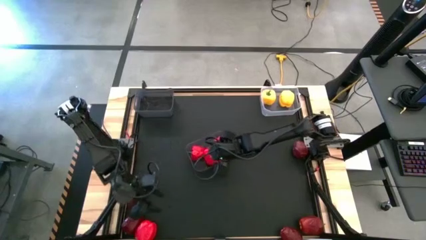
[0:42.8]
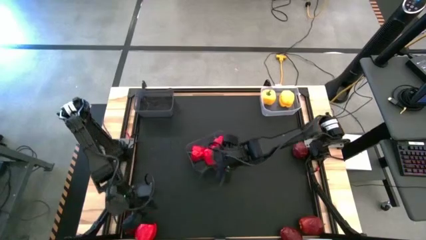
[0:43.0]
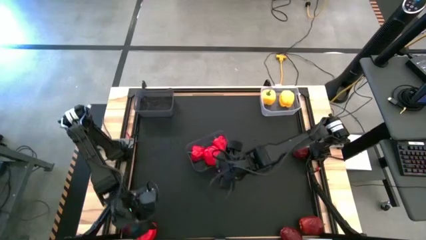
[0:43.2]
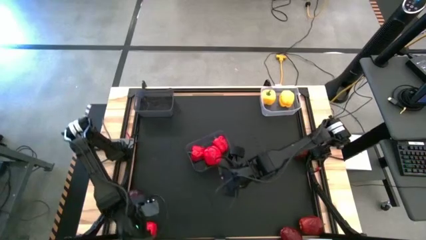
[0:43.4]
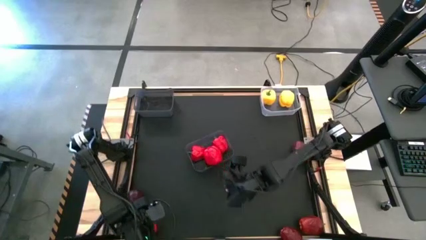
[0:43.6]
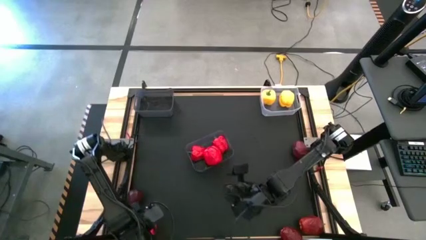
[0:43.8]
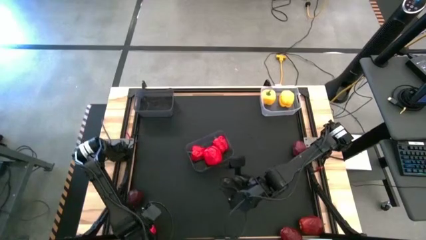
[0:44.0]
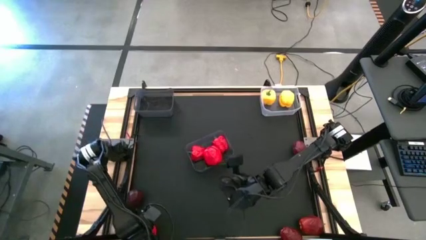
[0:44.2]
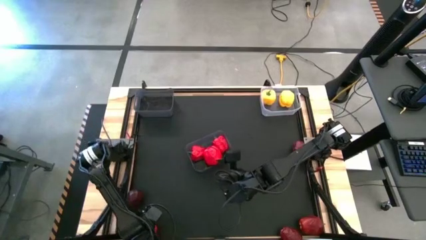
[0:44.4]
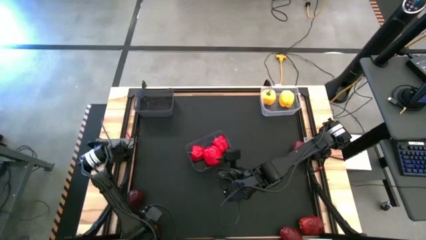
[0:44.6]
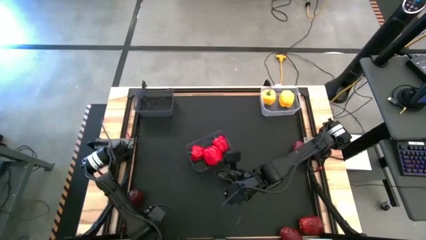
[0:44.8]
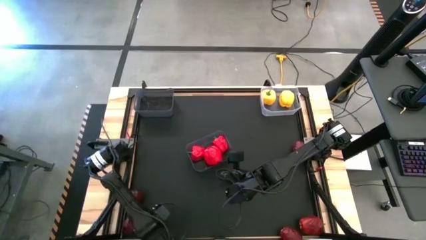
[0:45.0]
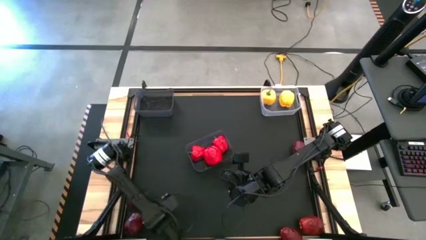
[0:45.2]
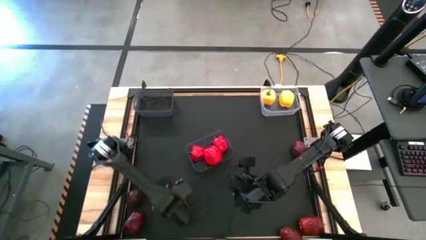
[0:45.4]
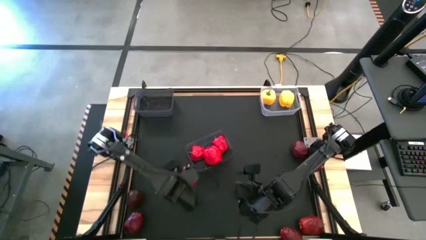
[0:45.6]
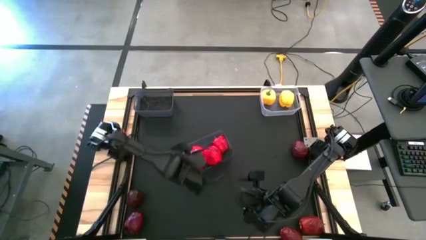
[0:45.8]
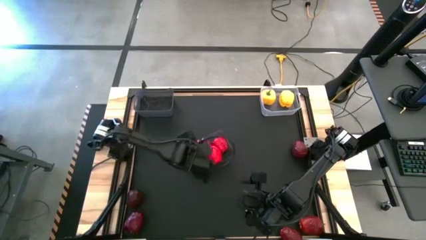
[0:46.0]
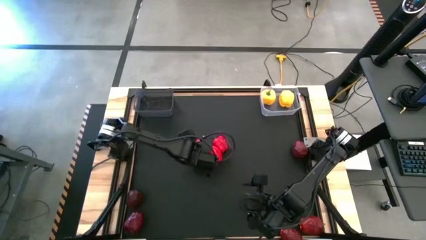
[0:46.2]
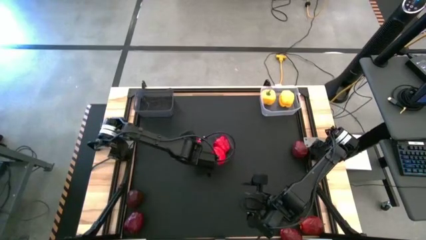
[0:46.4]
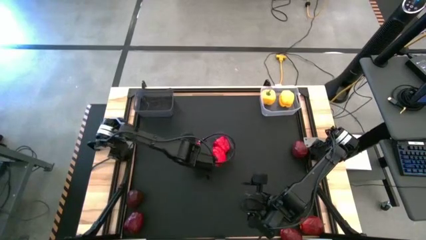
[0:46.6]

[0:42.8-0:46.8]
Task: Sort produce into baskets
Put the red bell pepper into the bottom black bin

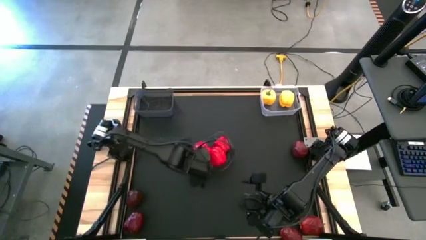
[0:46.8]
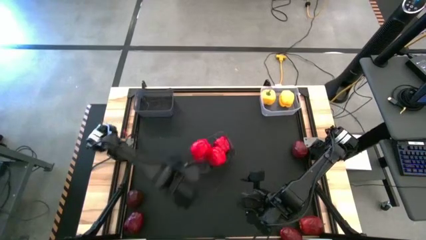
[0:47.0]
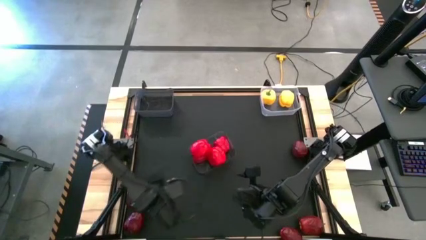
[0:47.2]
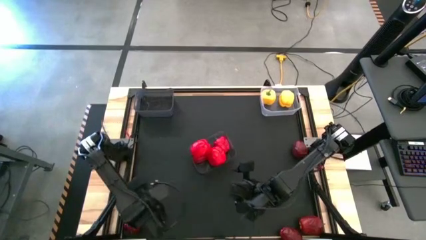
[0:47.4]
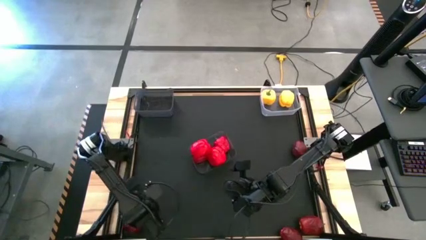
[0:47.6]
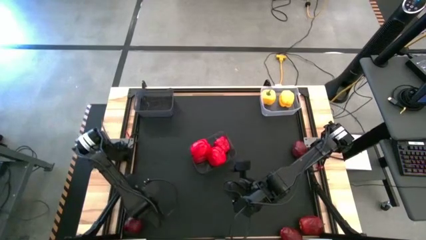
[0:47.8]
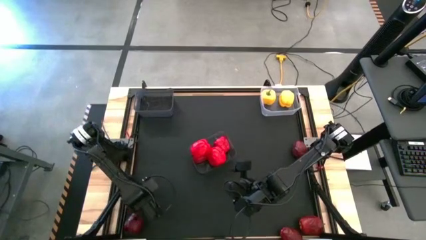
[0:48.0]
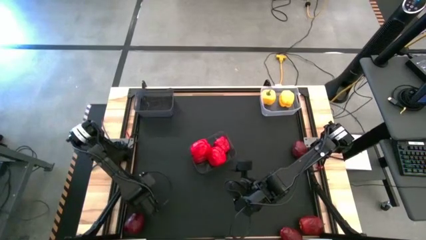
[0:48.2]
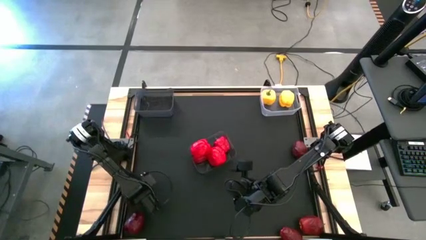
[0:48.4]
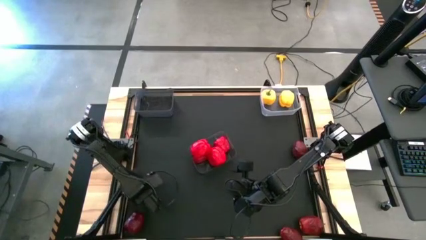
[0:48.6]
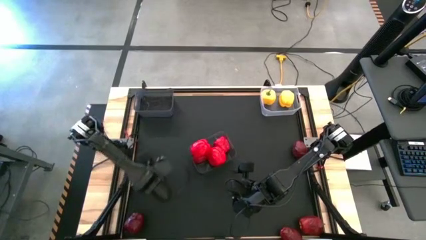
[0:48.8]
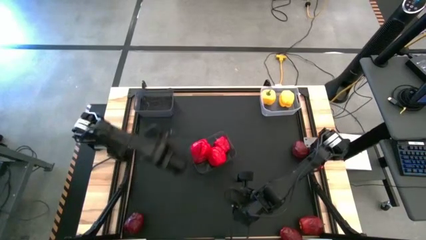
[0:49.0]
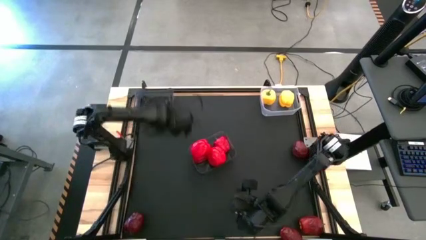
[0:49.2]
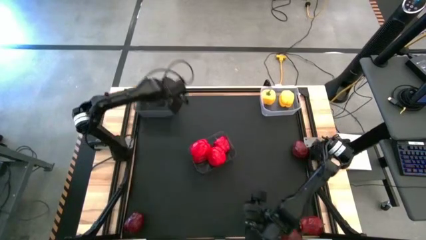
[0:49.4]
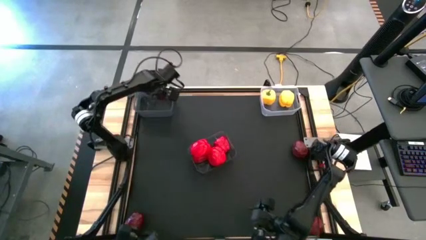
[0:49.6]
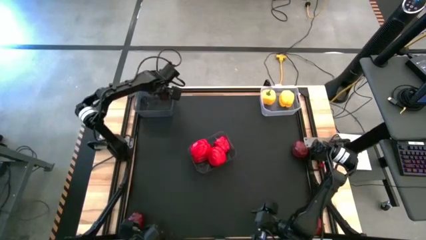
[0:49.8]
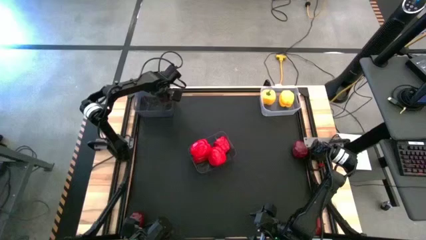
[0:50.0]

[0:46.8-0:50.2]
Put the red apple into the top black bin

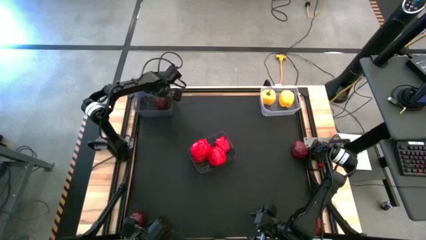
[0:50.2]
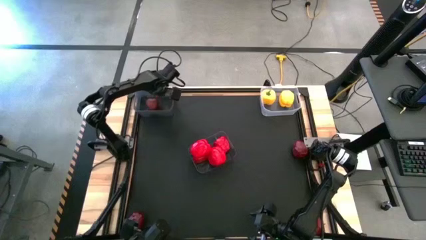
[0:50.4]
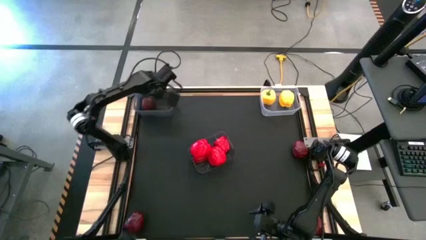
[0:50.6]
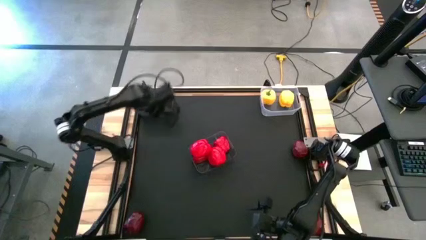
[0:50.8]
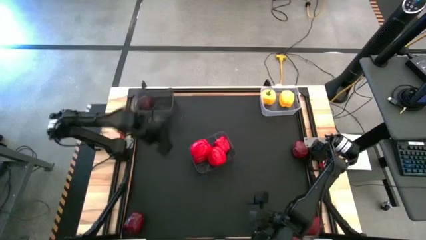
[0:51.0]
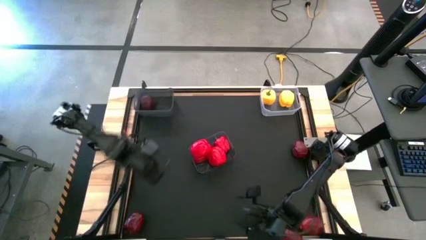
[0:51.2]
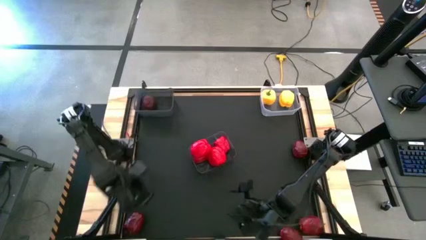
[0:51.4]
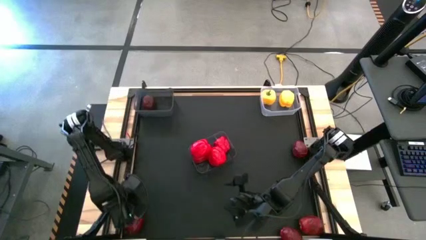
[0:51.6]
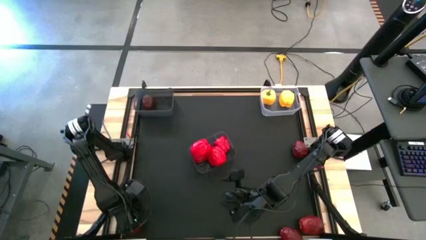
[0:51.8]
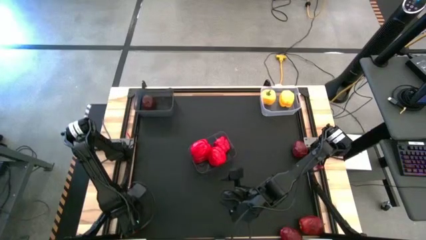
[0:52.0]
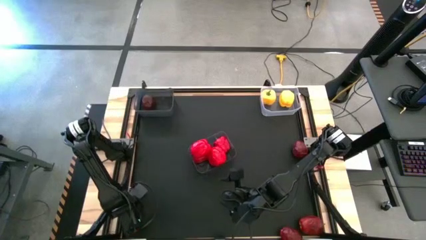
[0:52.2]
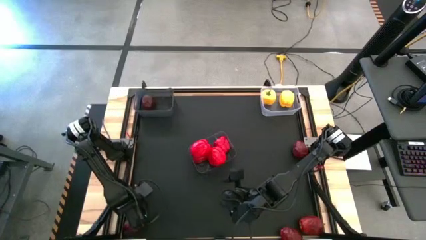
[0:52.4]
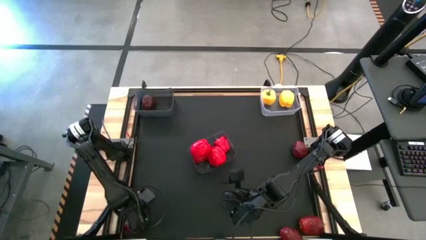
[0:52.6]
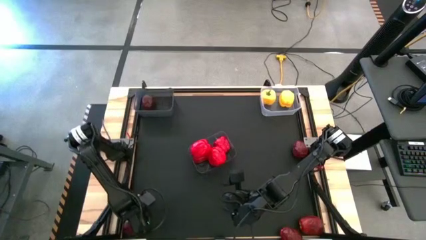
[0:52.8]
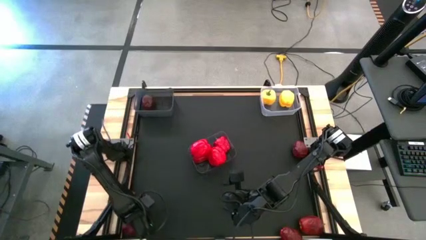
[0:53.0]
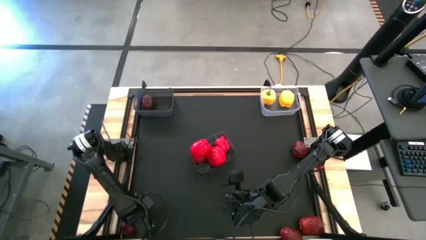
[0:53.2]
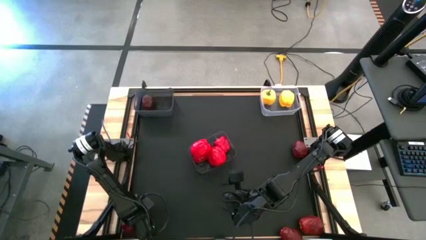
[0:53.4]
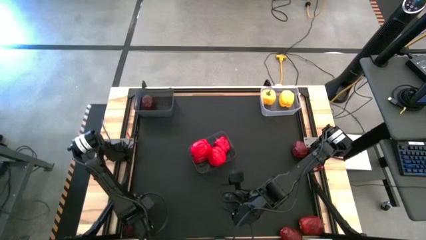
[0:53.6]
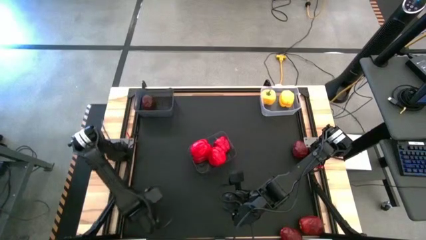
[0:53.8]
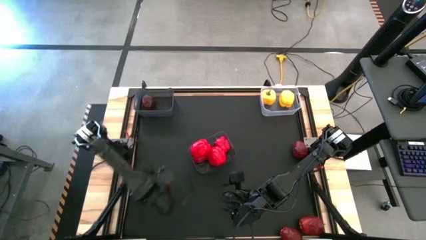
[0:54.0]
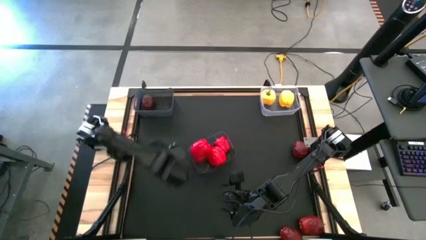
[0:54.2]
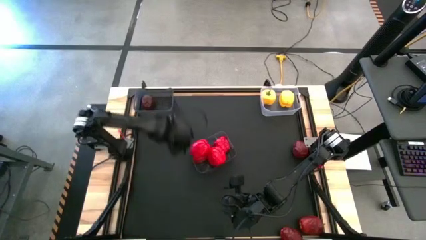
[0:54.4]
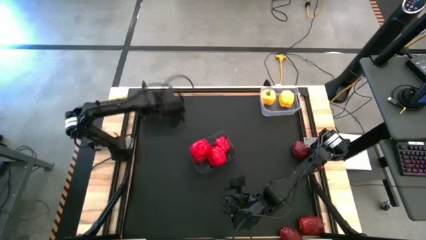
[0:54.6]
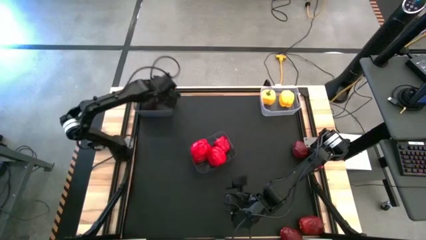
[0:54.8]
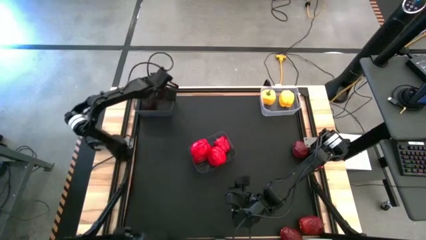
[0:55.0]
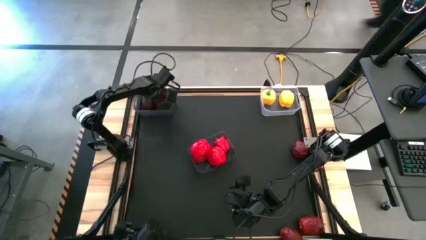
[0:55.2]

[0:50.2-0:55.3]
Put the red apple into the top black bin

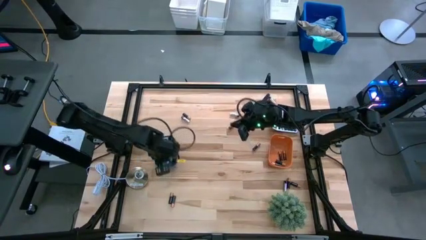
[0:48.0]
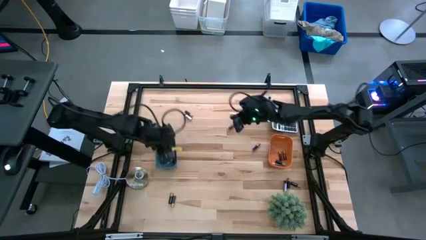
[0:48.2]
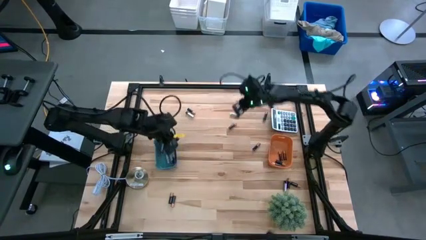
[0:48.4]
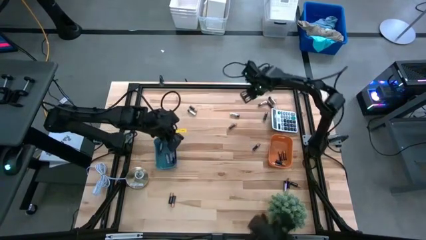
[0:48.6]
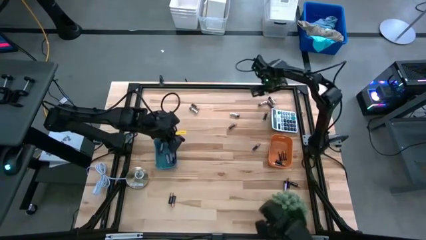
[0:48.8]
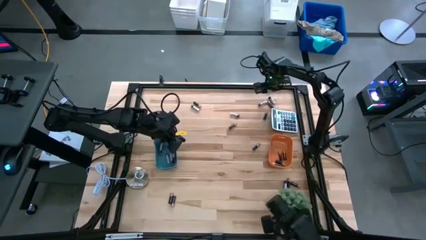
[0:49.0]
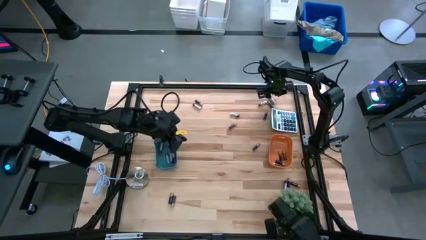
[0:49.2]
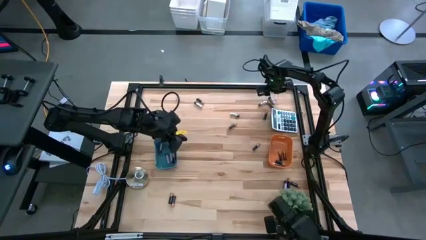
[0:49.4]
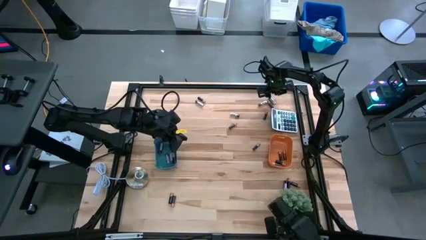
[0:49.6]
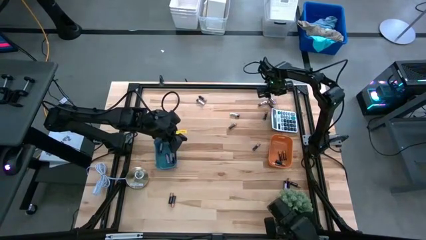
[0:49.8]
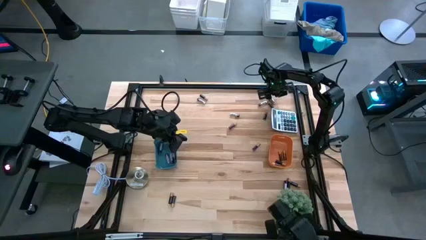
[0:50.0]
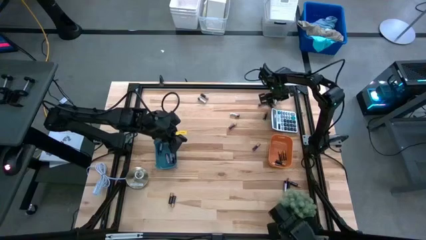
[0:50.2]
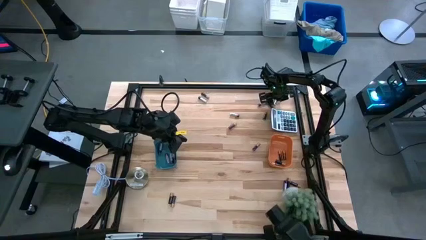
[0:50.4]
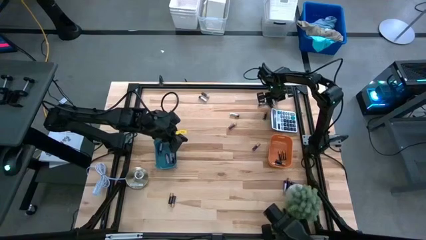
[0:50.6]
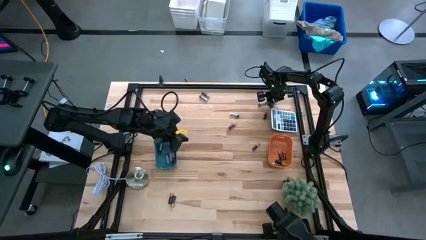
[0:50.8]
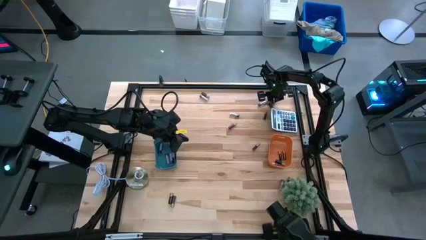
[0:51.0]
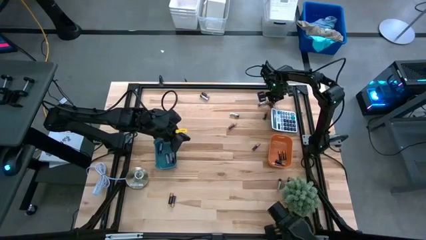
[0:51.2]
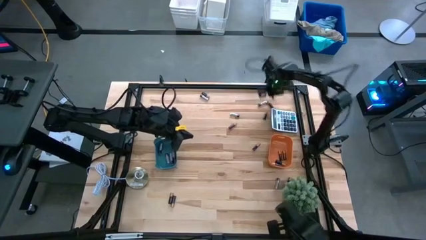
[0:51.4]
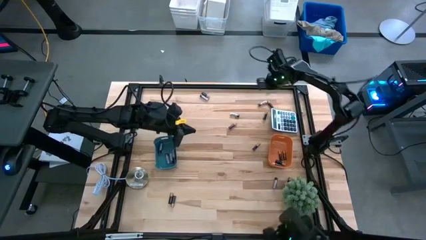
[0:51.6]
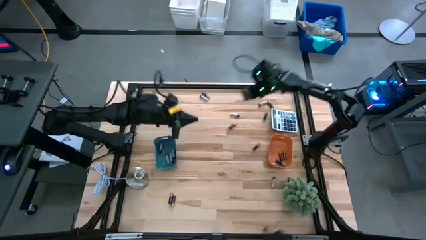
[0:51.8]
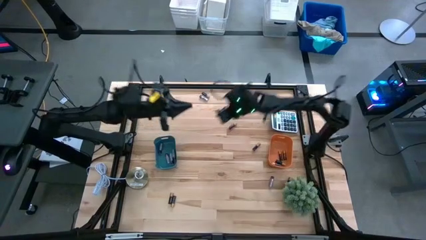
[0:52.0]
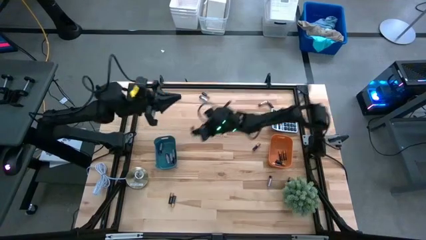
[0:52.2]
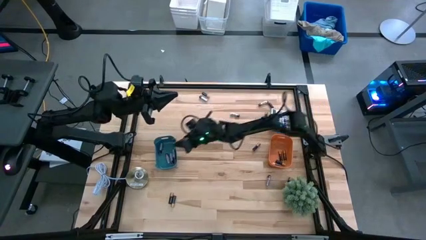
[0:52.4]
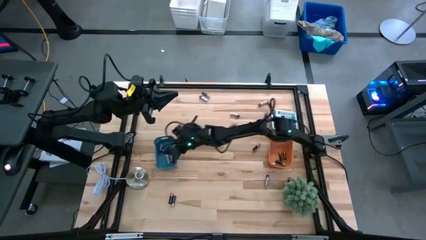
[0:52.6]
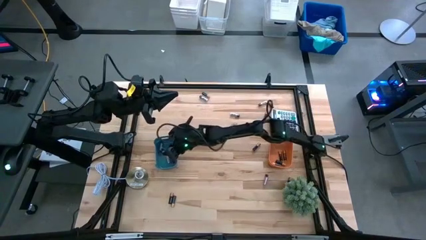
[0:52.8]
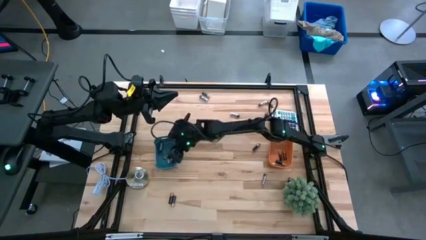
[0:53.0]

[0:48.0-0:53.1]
Task: Sort batteries
Put the silver battery into the blue bin
